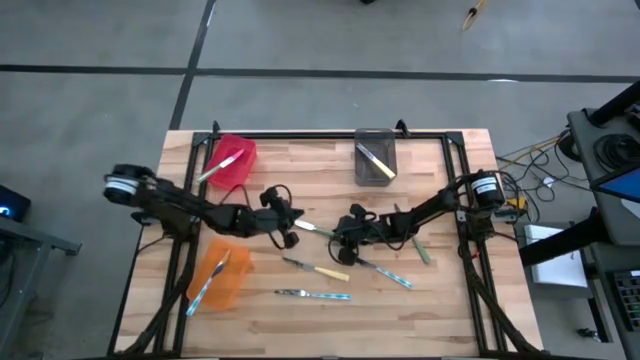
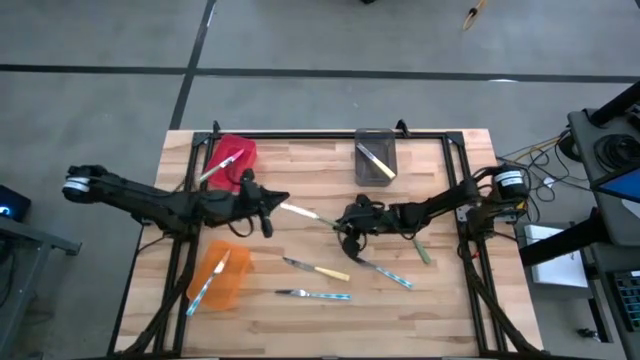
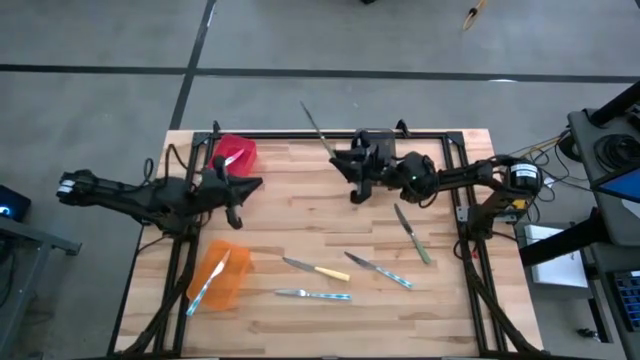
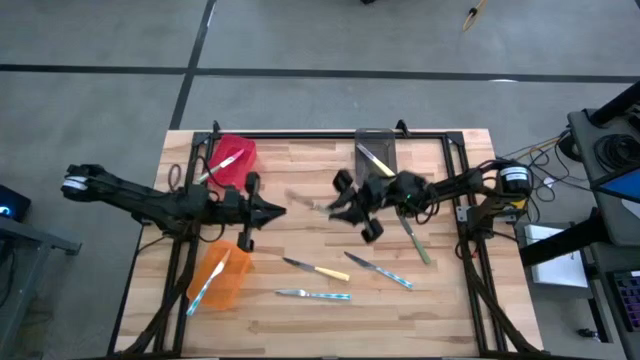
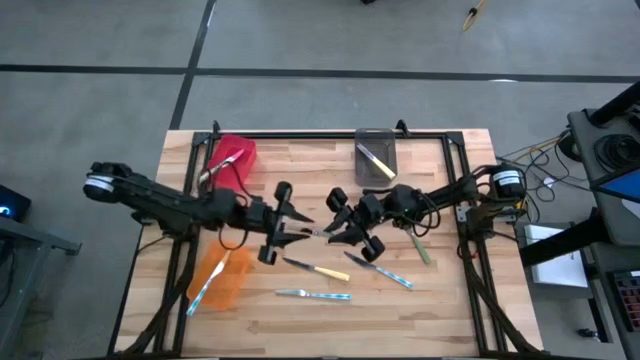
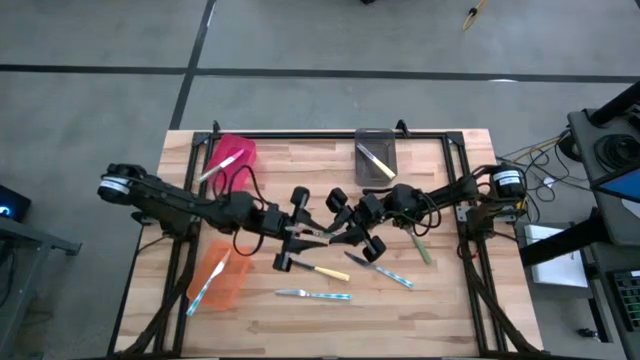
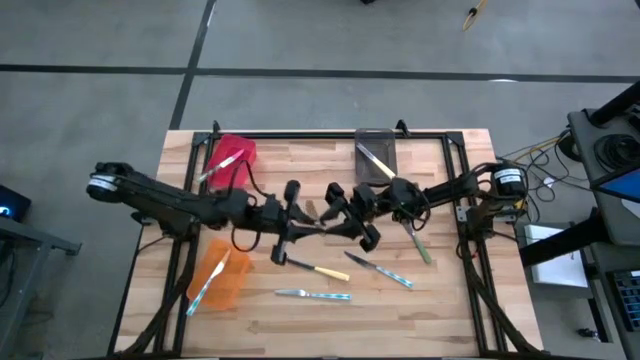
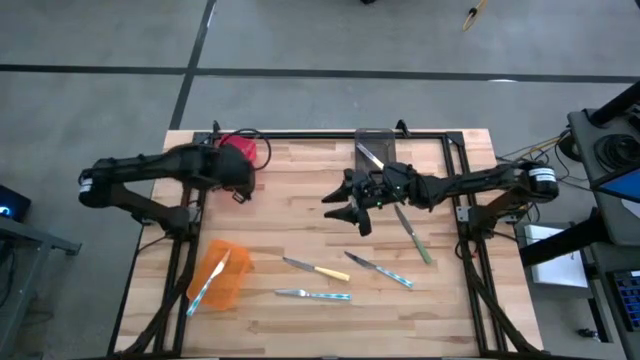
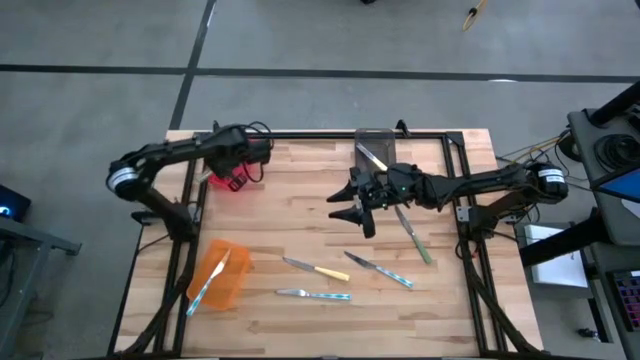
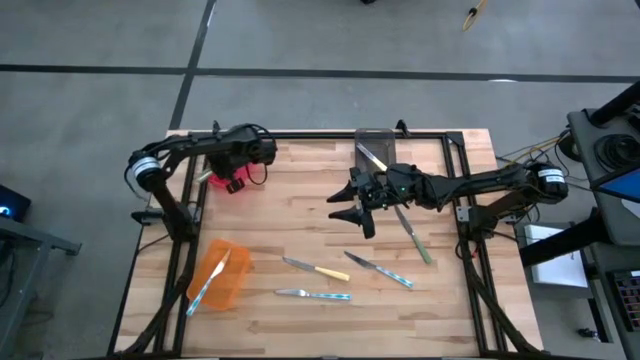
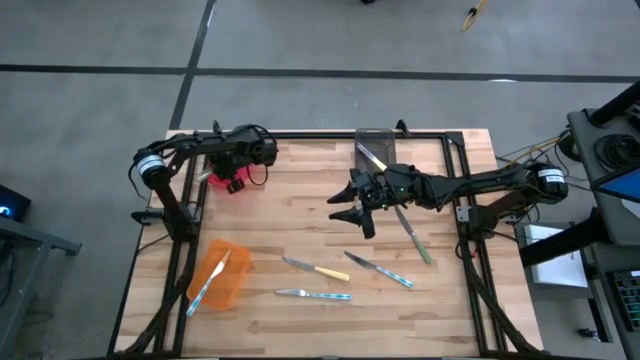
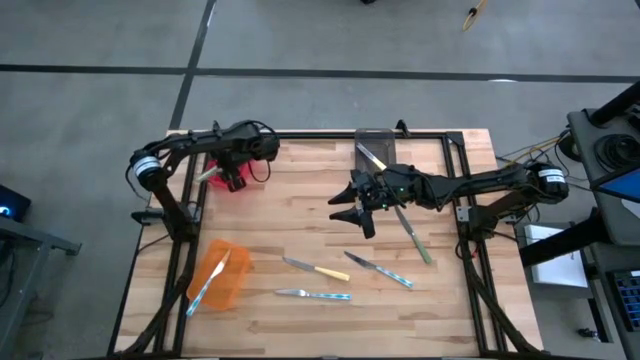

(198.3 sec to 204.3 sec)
Task: Sort silverware by color (type)
Put the left green knife into the red bin

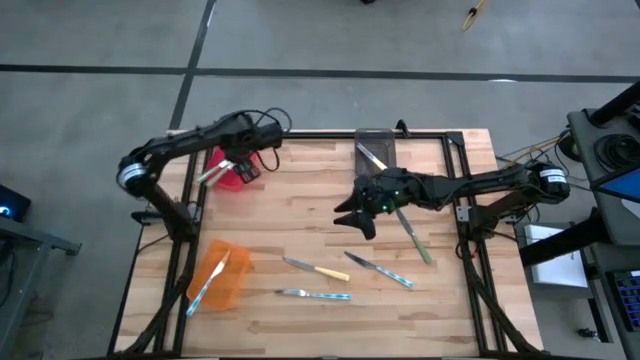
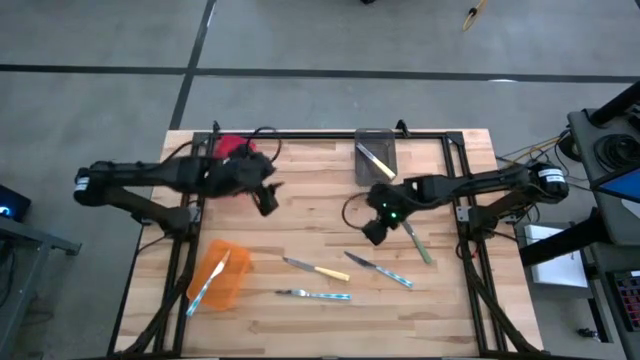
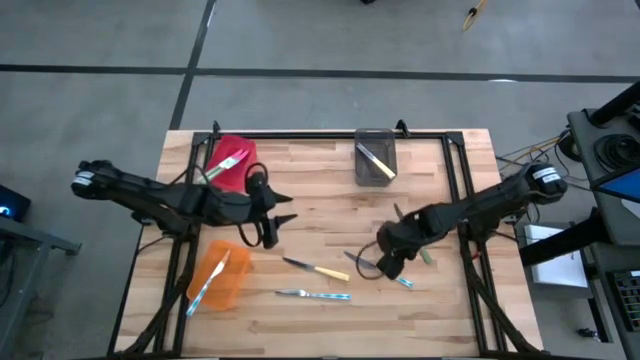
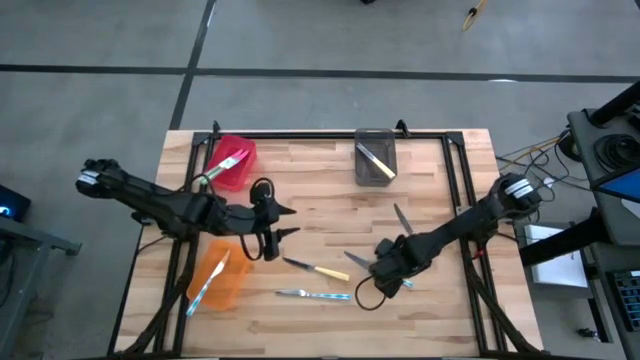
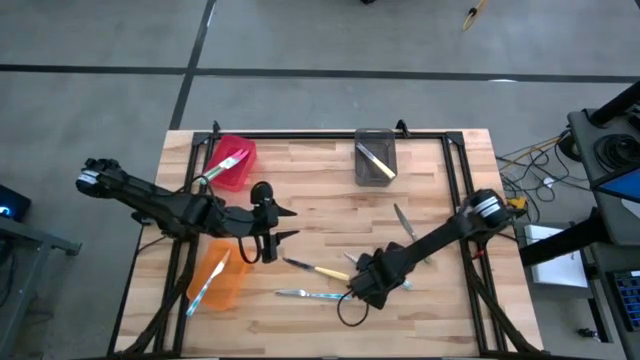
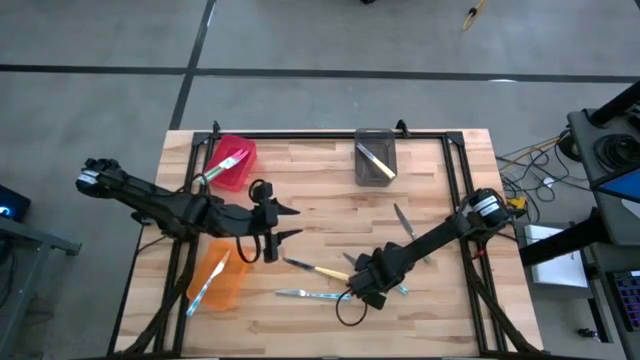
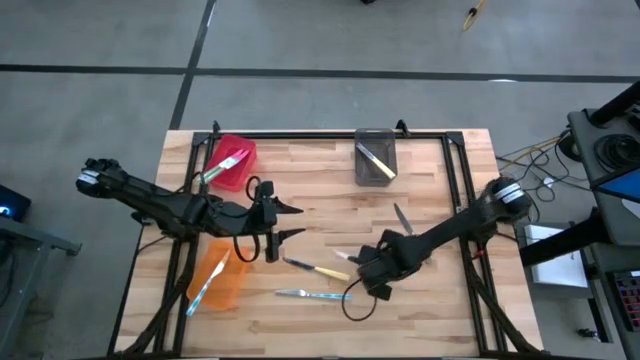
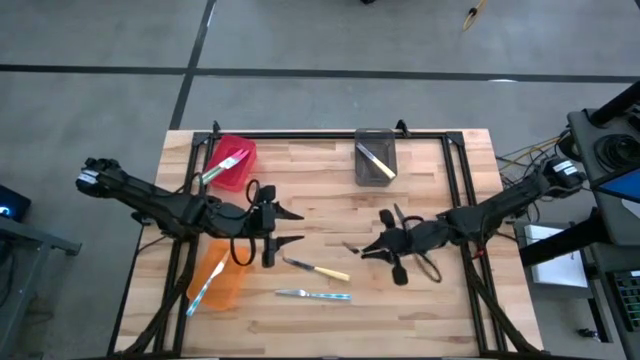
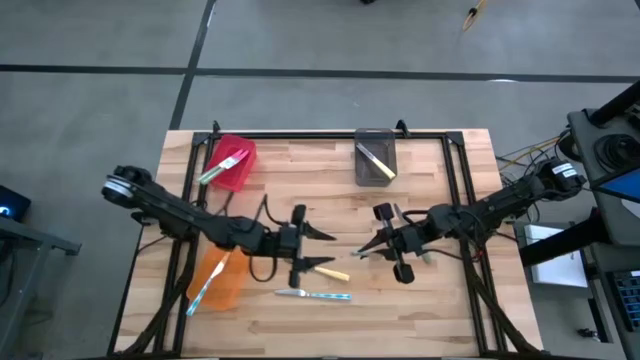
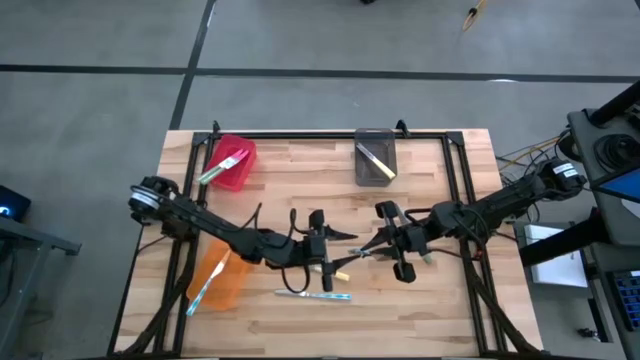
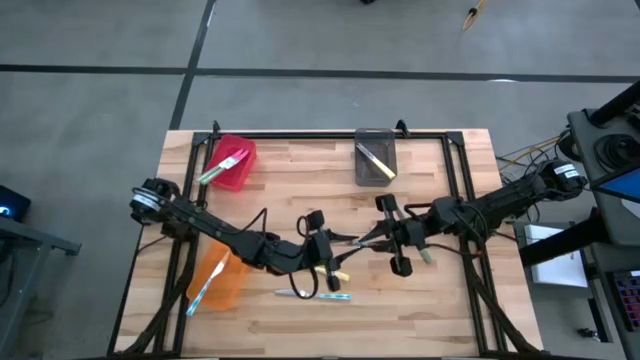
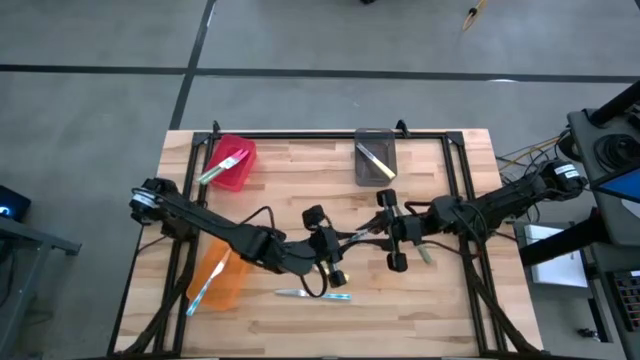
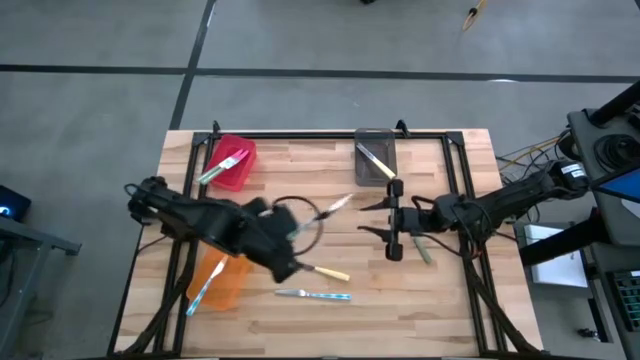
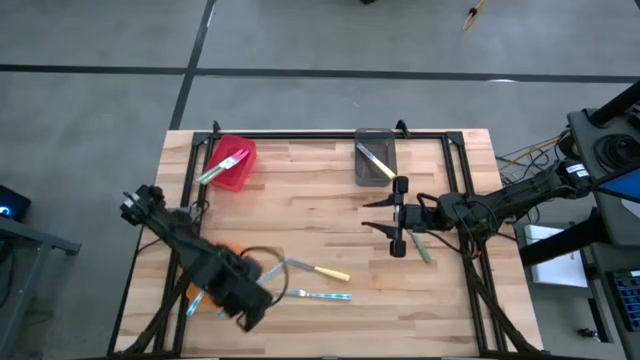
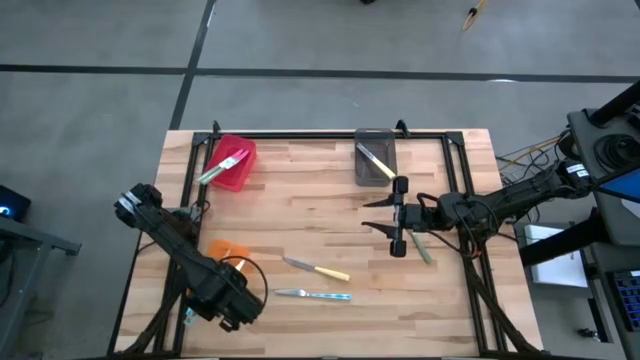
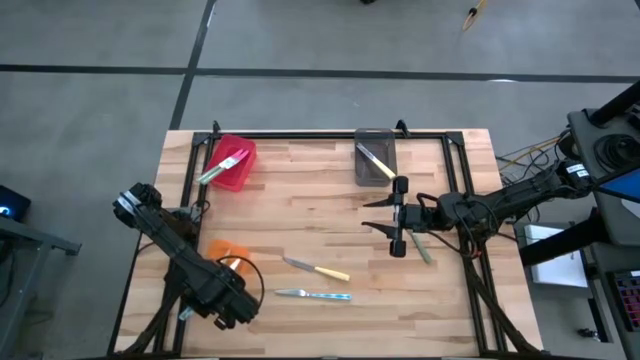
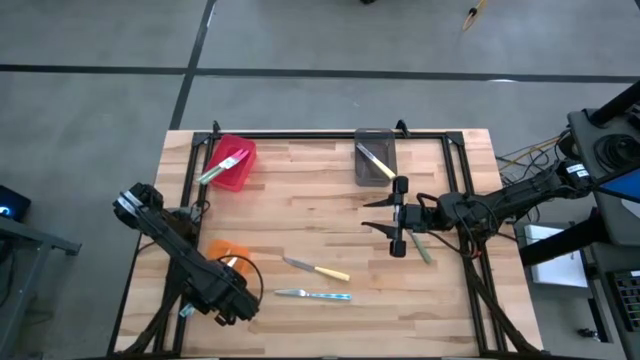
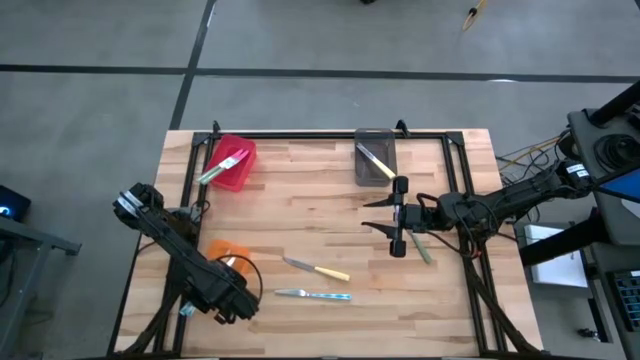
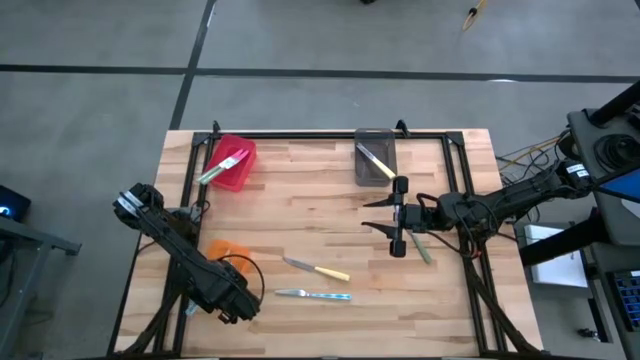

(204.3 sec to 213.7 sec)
Put the right blue knife into the orange bin

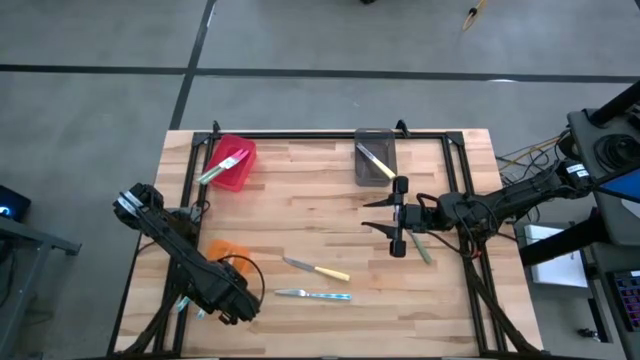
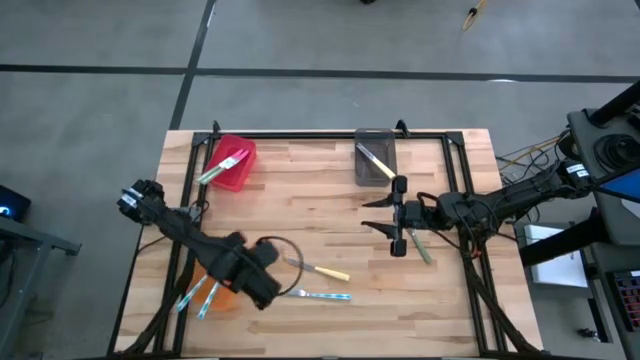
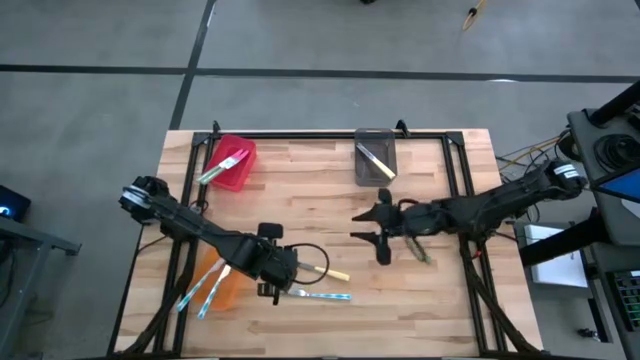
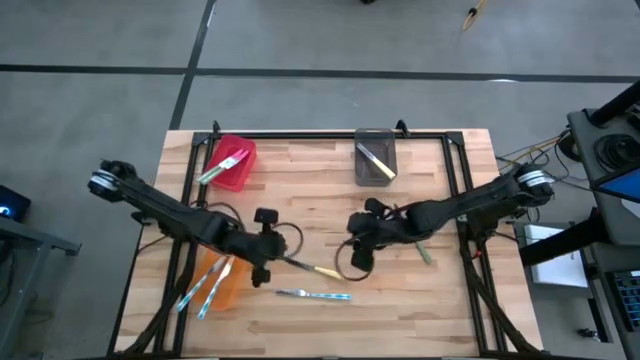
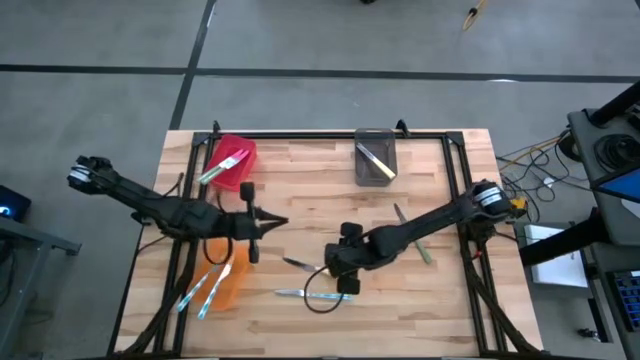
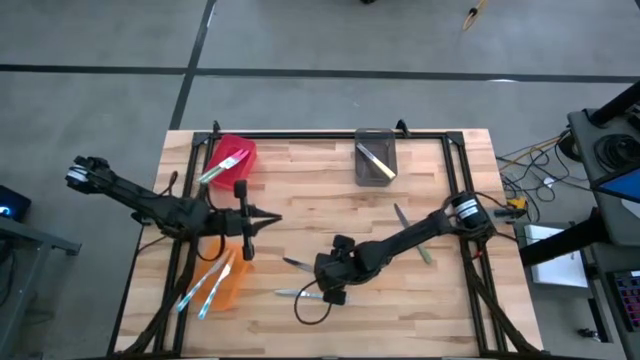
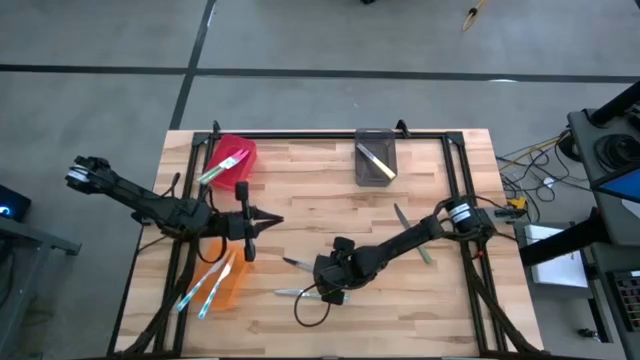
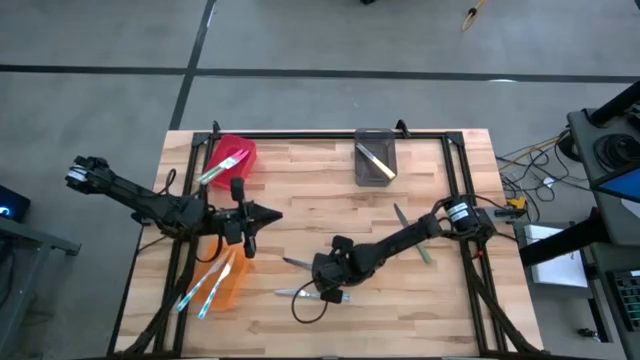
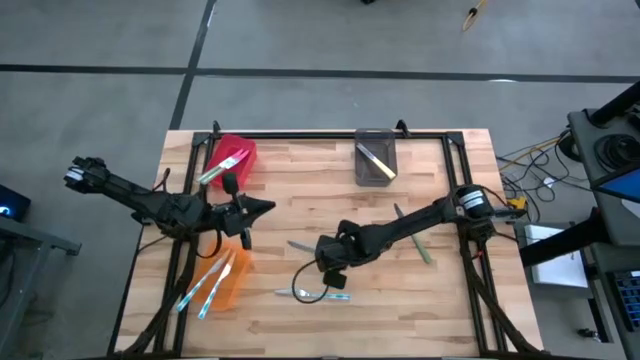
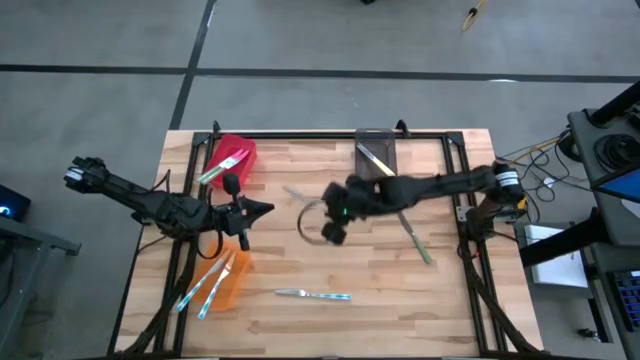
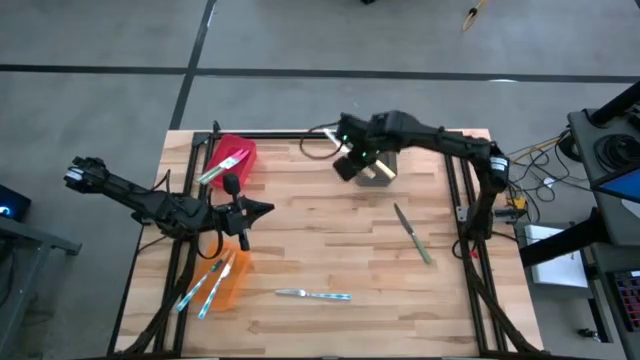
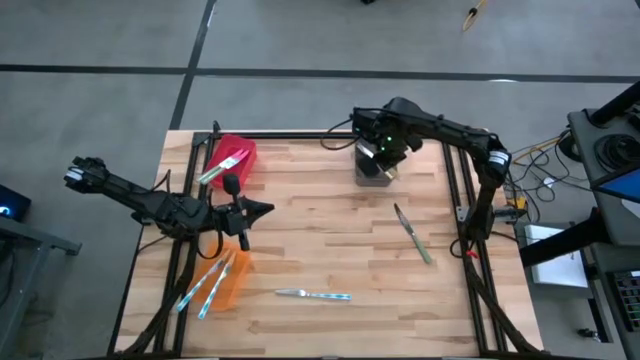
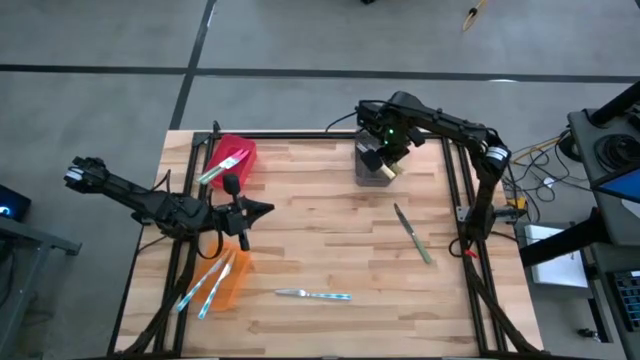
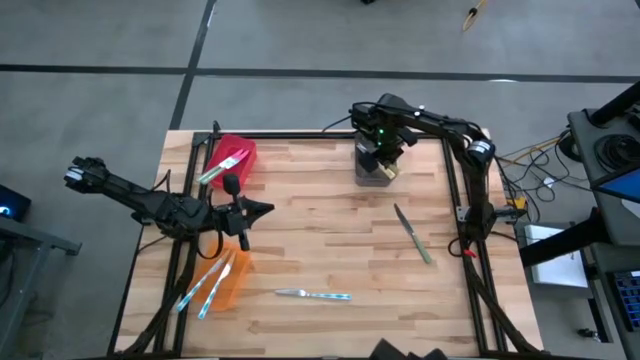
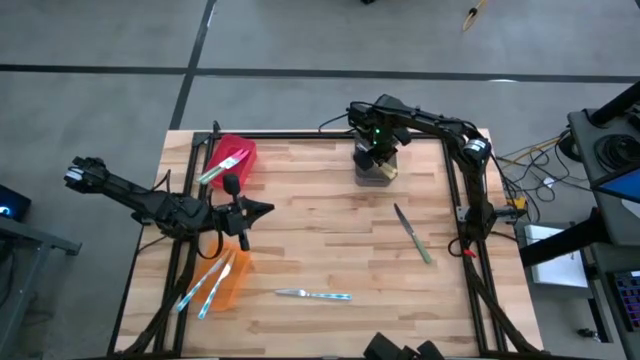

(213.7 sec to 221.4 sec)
Put the yellow knife into the black bin
